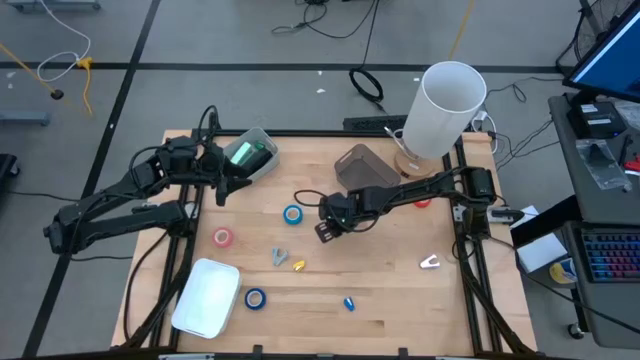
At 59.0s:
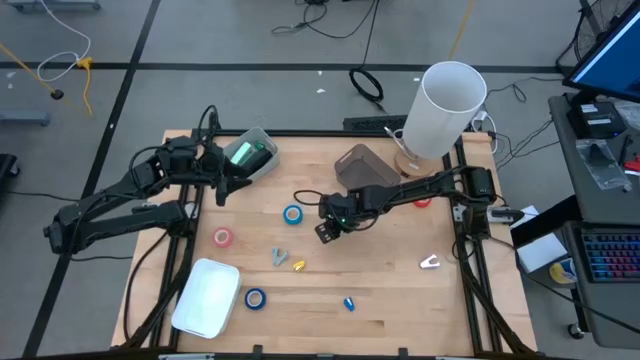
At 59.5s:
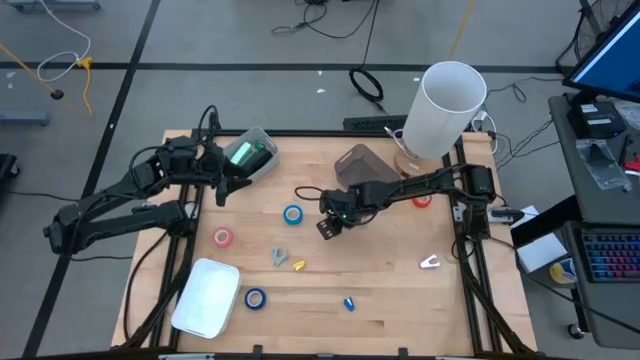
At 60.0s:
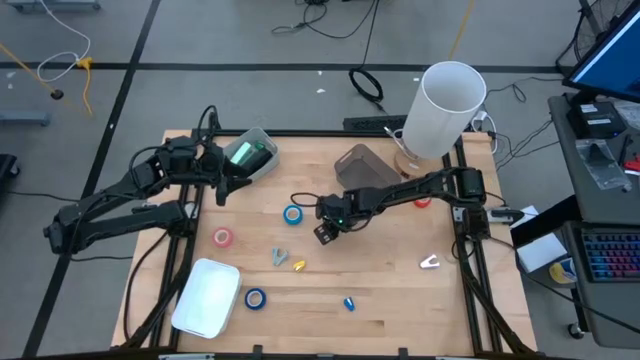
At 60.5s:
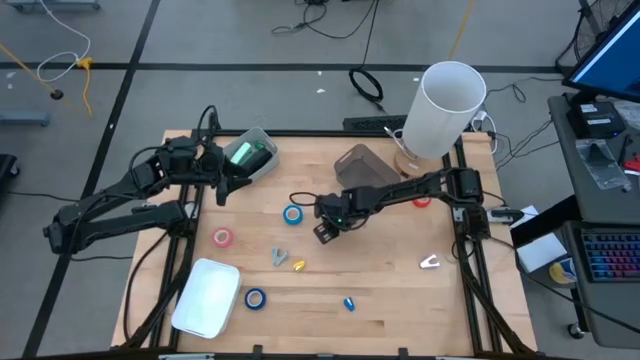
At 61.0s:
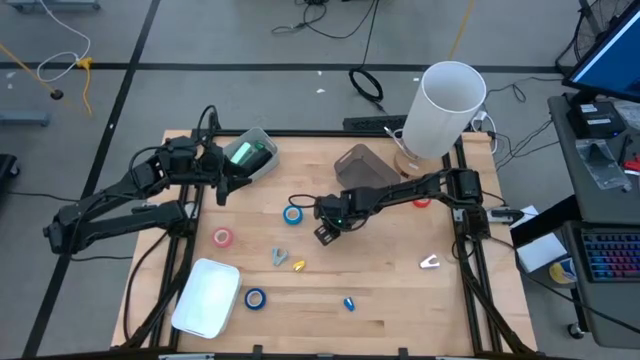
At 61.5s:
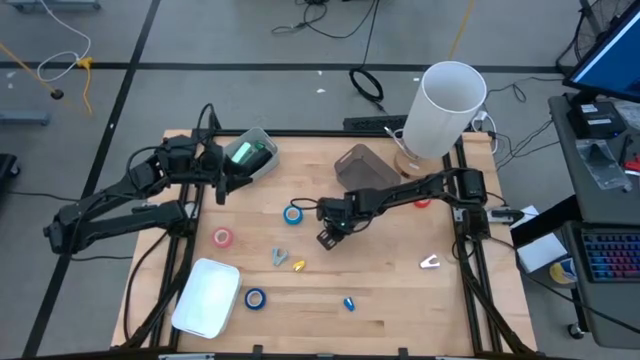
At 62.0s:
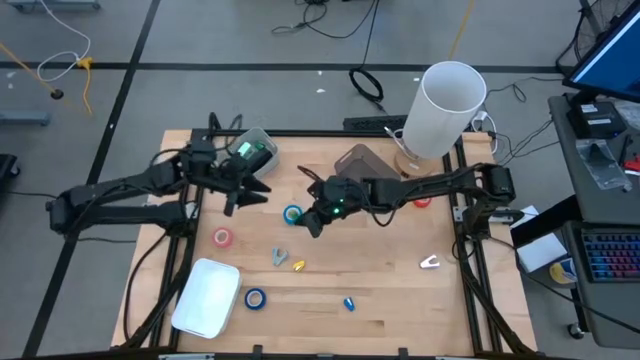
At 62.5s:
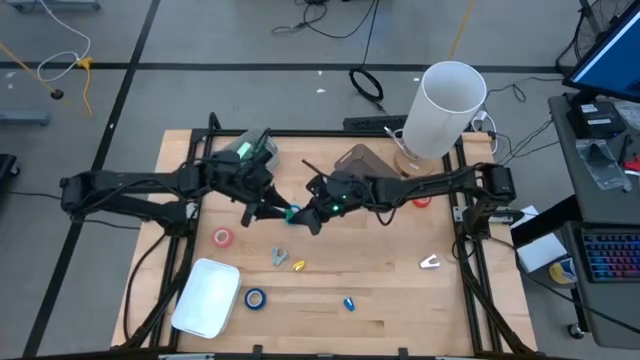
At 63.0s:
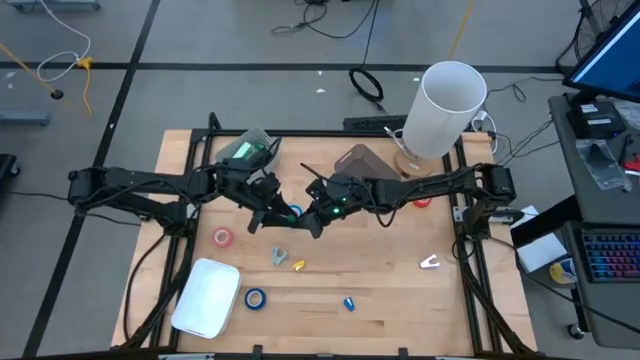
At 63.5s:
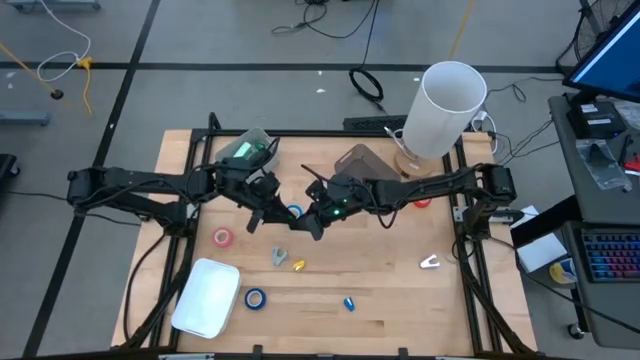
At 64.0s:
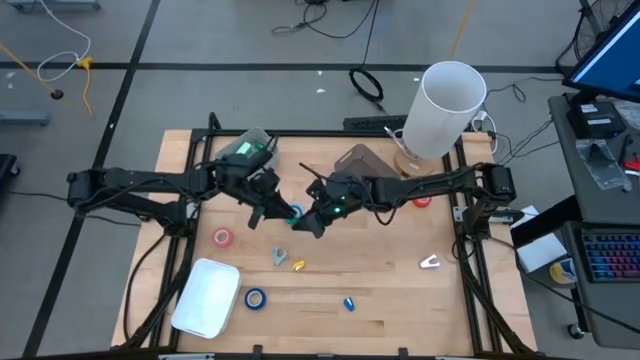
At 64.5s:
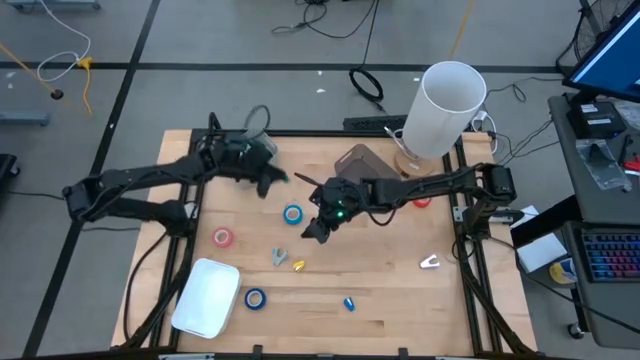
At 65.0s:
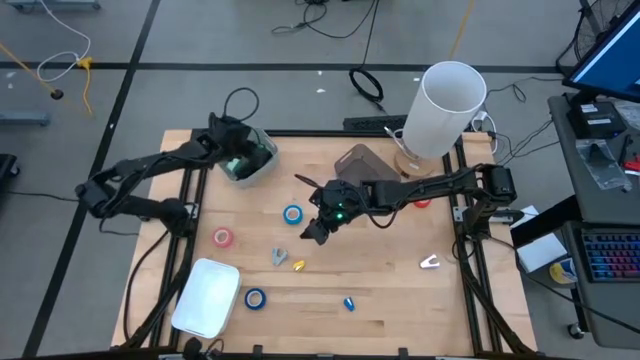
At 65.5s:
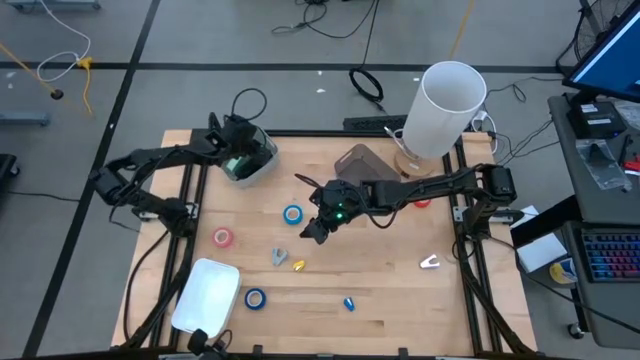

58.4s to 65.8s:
Task: Pick and place Stapler, Stapler remover, tape
Put the green stapler into the gray bin

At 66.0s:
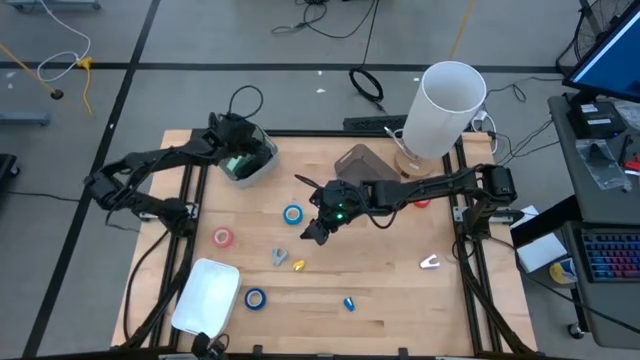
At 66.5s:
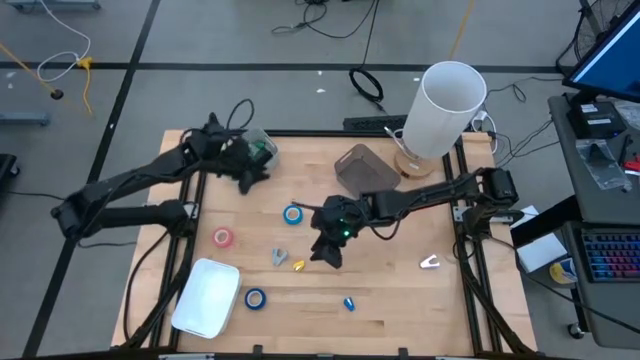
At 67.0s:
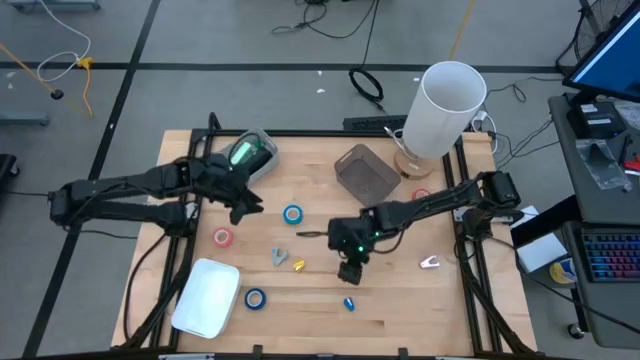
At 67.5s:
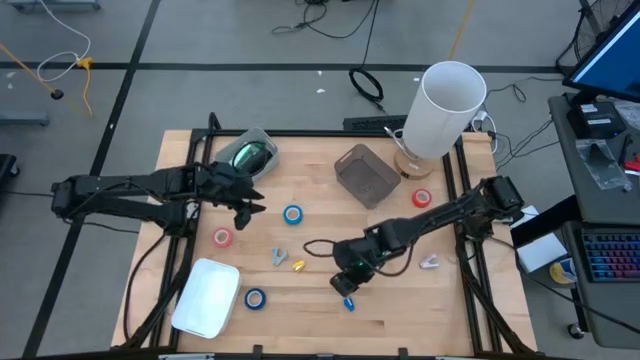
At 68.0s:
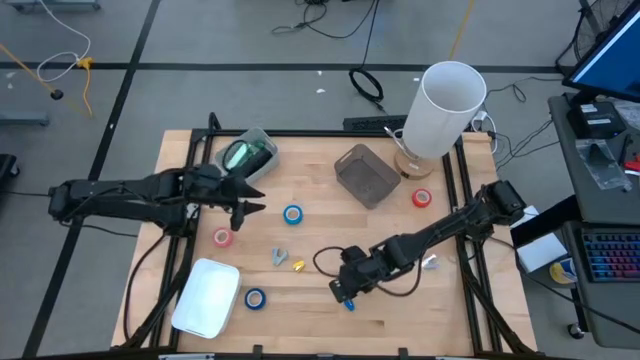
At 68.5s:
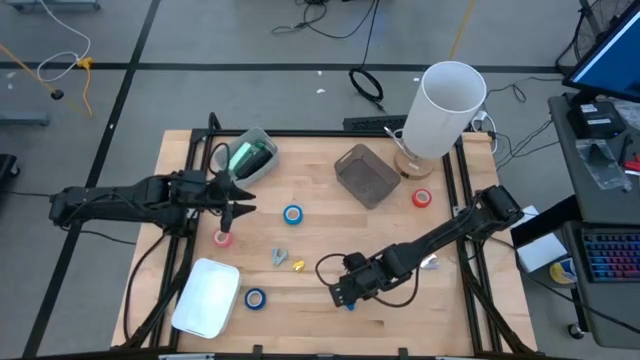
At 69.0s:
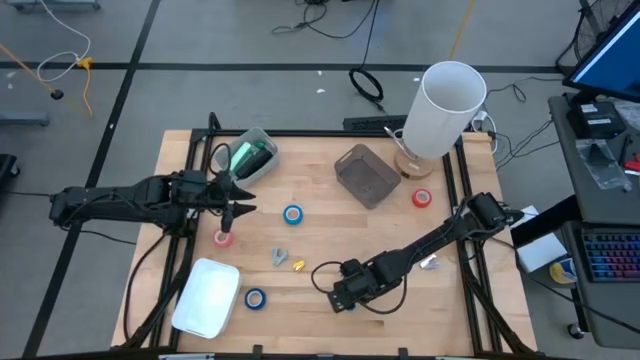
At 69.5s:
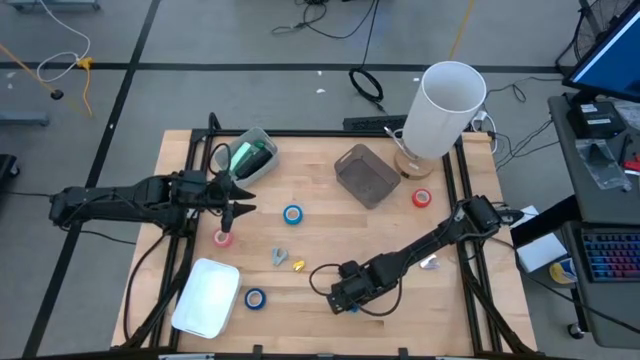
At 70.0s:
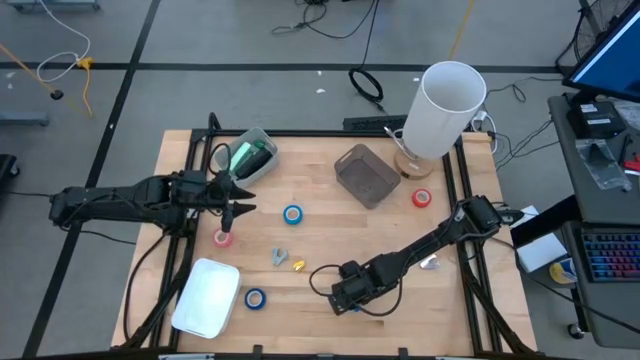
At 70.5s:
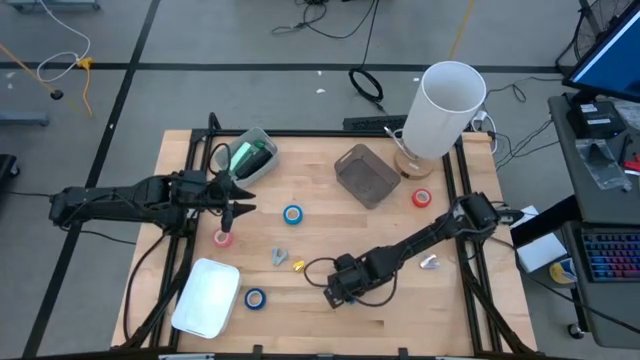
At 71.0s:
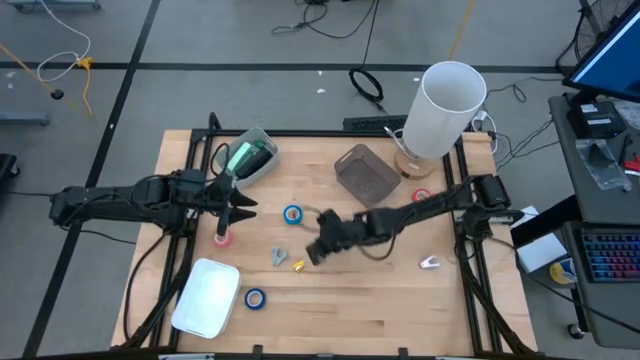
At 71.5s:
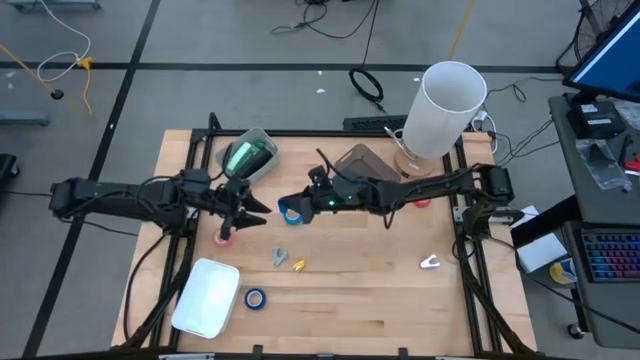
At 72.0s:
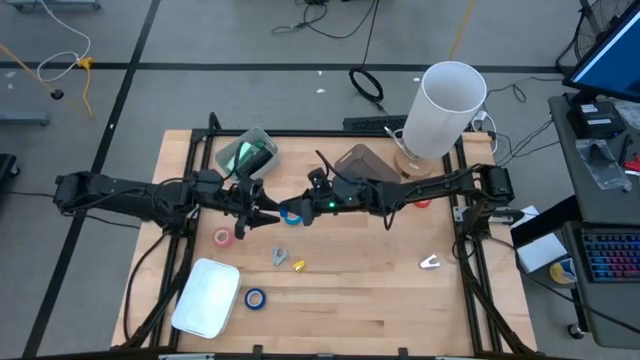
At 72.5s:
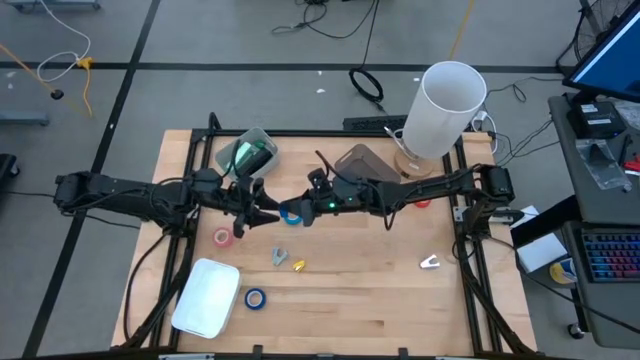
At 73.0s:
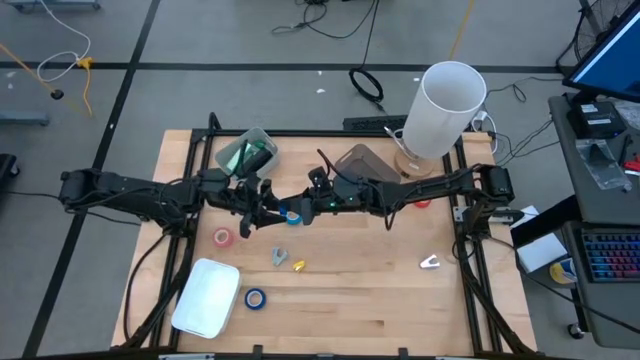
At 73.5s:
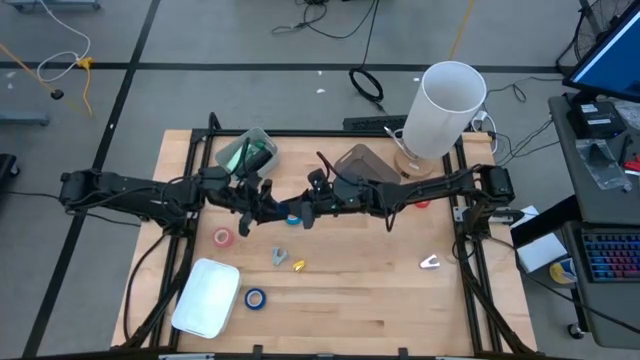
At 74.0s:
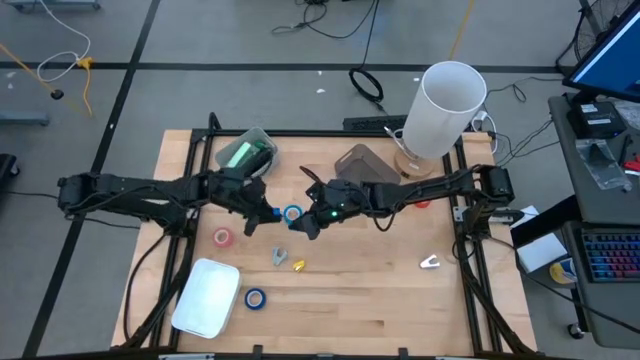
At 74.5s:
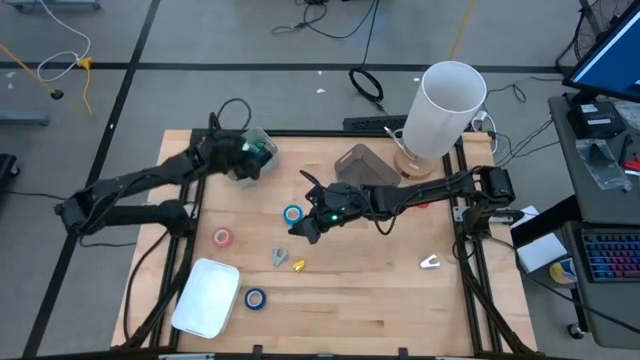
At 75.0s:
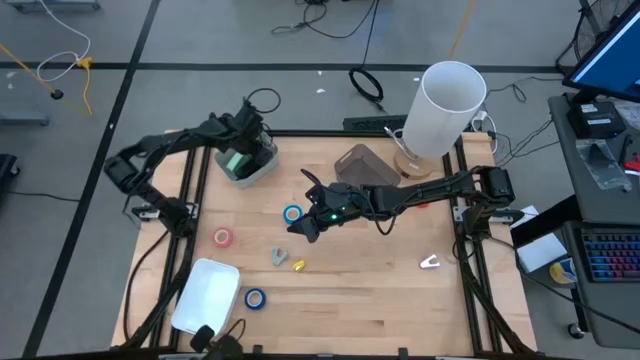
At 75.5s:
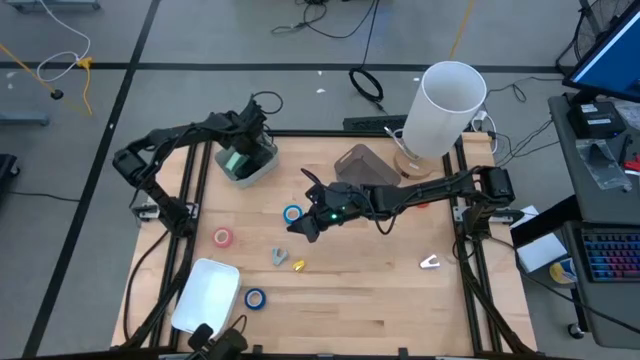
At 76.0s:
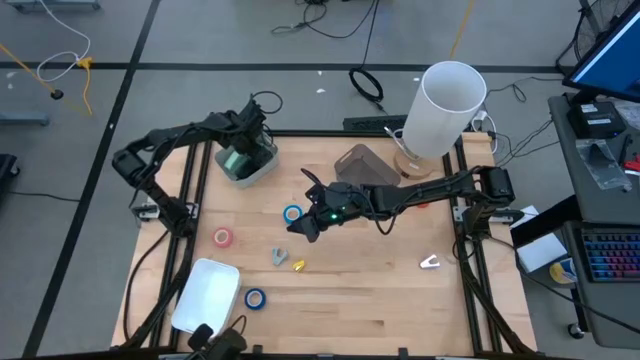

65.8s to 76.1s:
Put the blue stapler into the gray bin

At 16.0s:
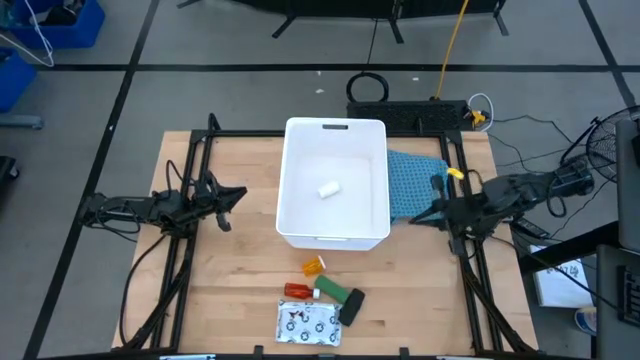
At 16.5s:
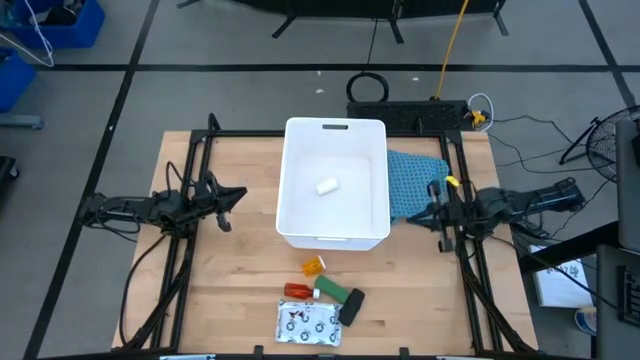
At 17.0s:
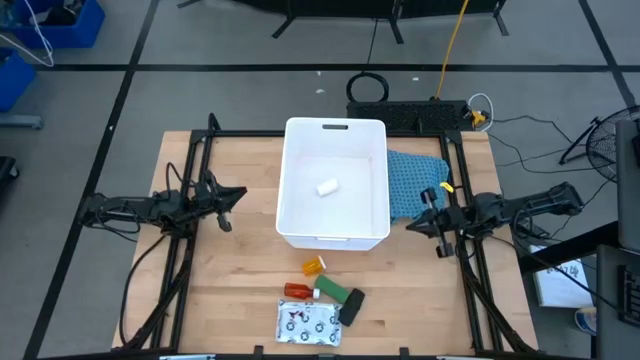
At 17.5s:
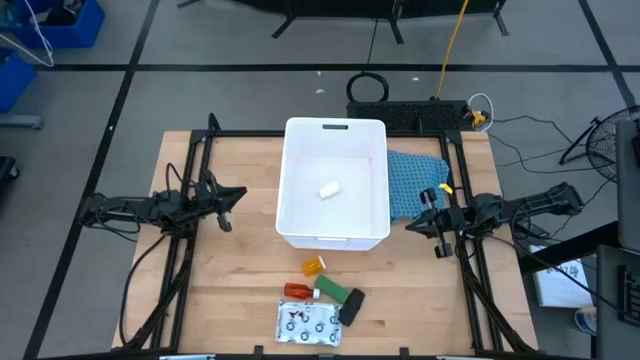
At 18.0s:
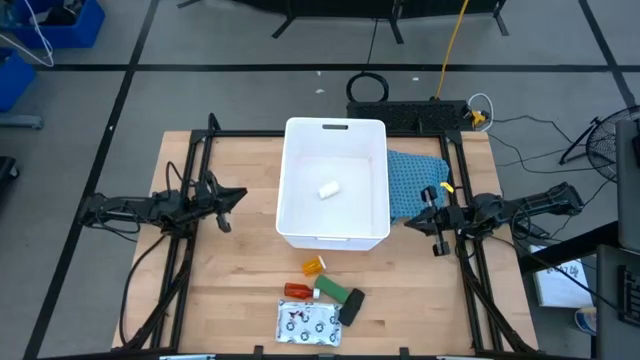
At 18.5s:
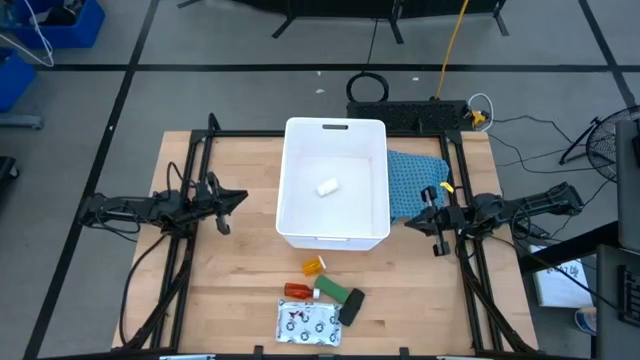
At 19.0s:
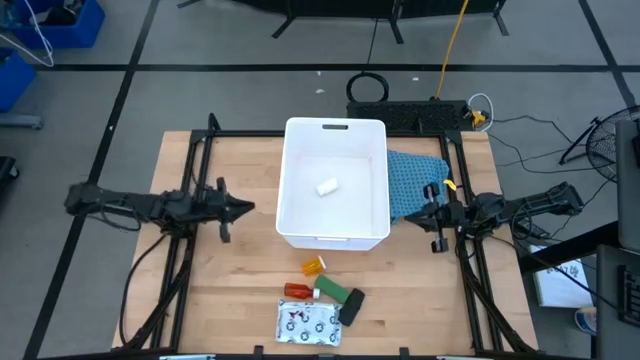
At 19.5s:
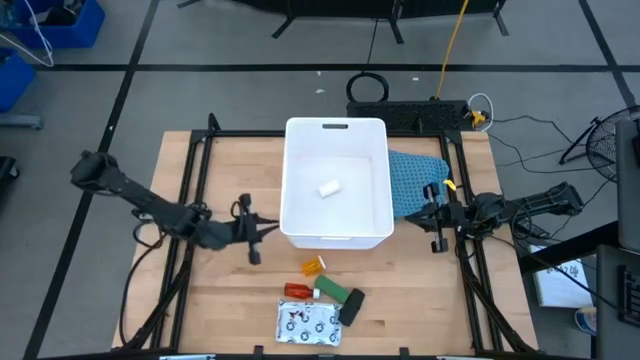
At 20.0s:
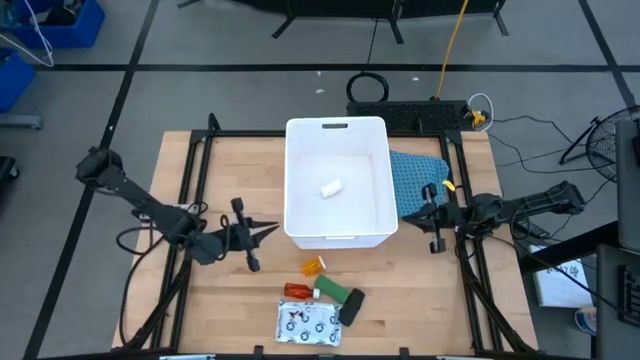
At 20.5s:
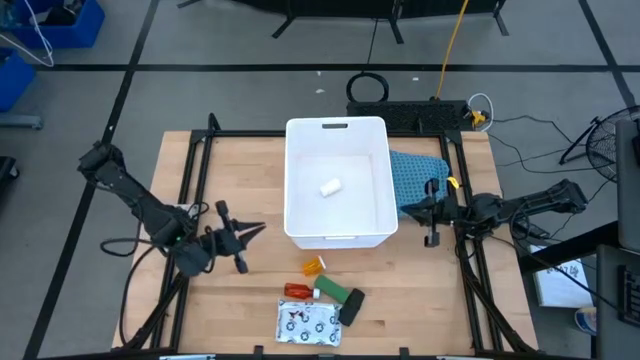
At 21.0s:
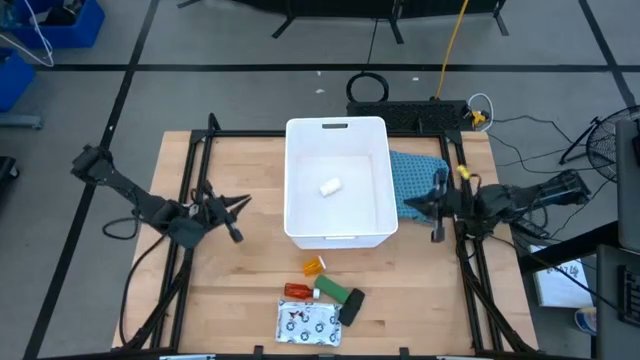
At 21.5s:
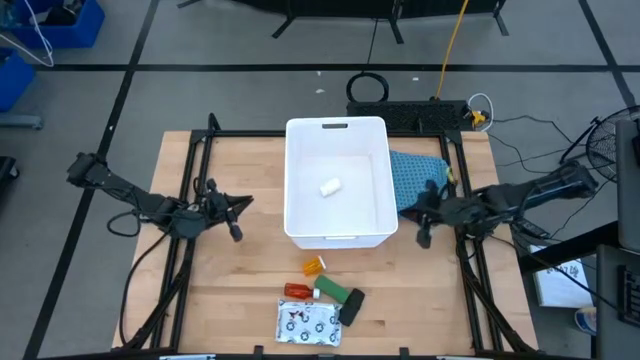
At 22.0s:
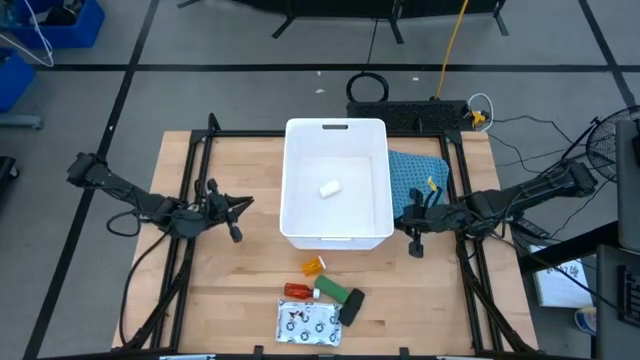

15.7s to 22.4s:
Task: Pick & place medical supplies in basket/bin
Adjust the white bin on the table
